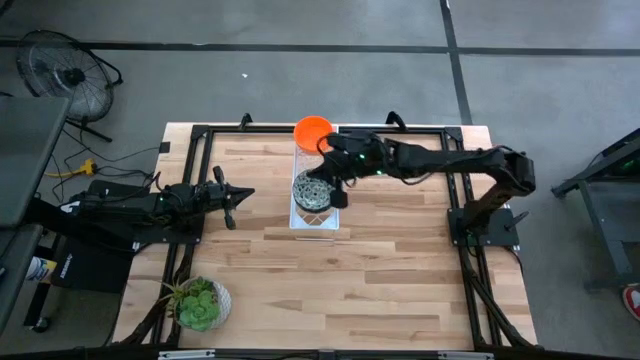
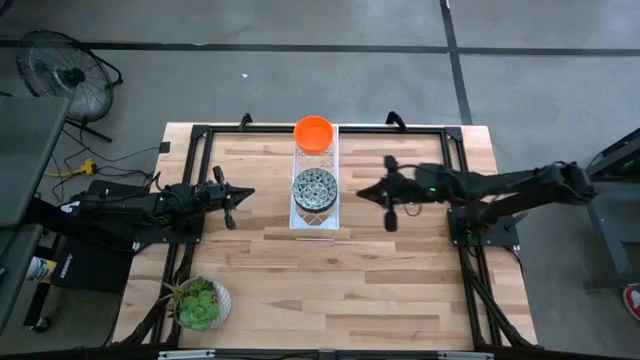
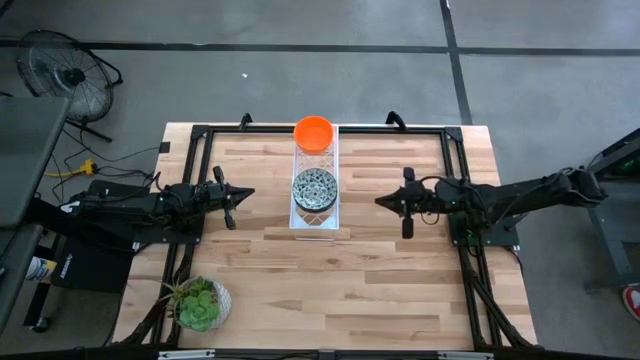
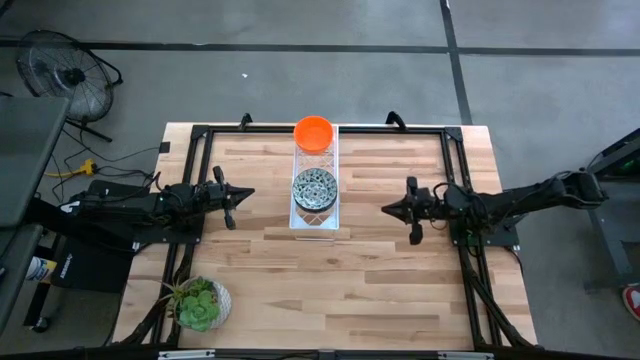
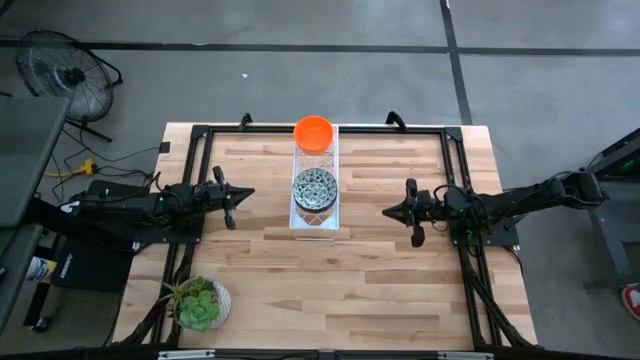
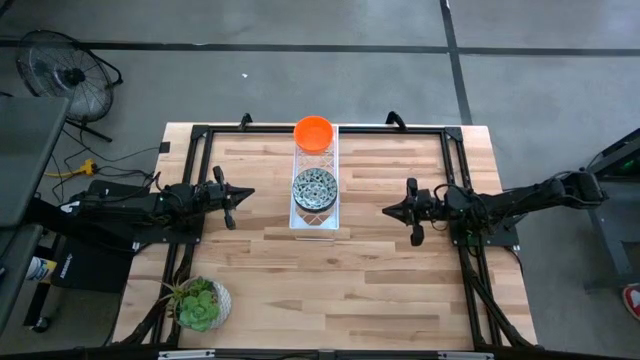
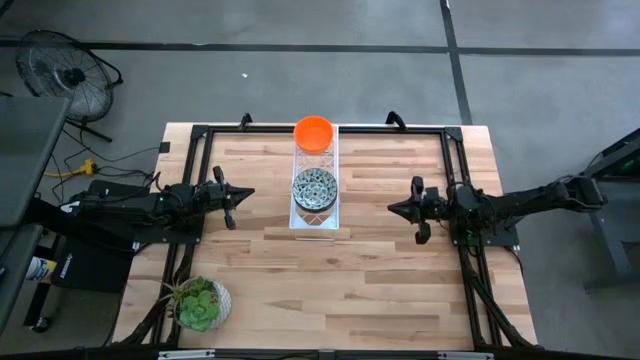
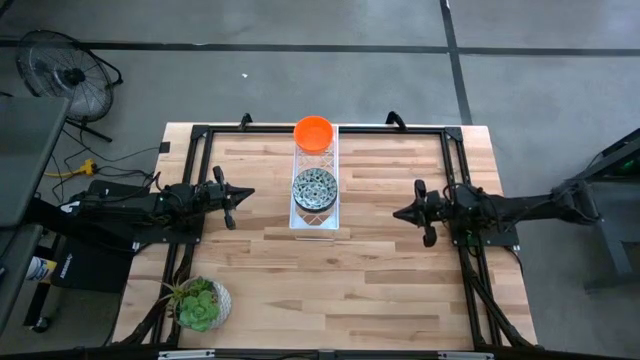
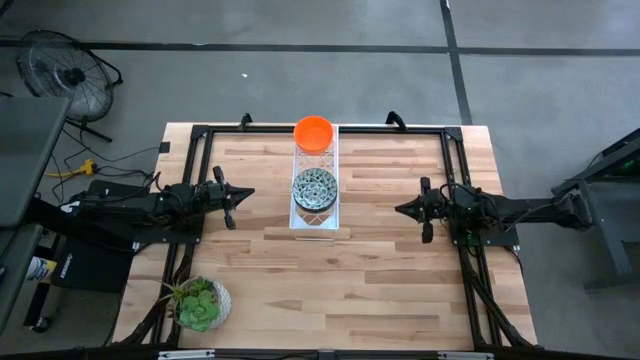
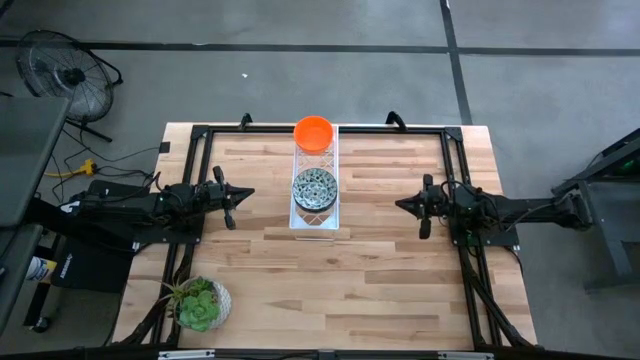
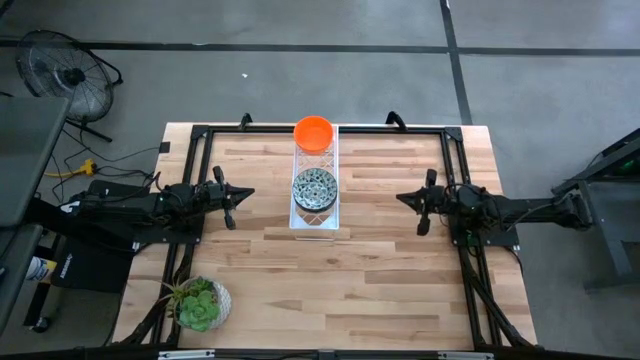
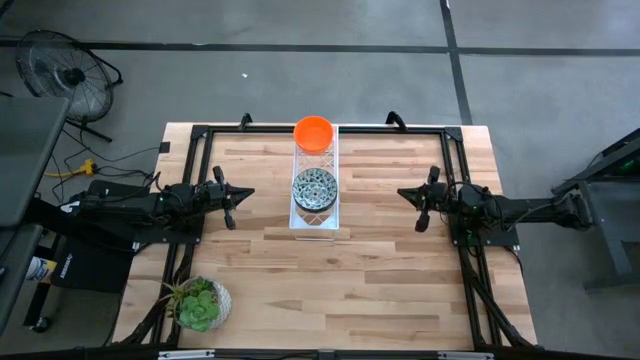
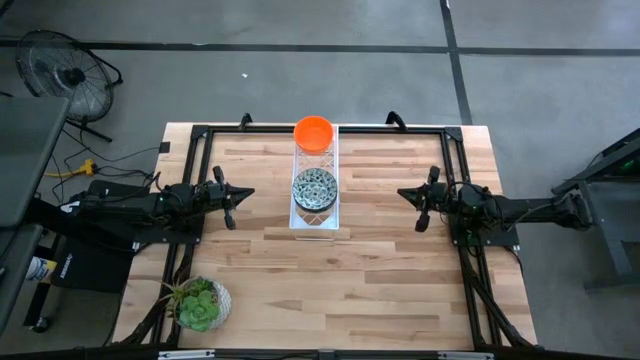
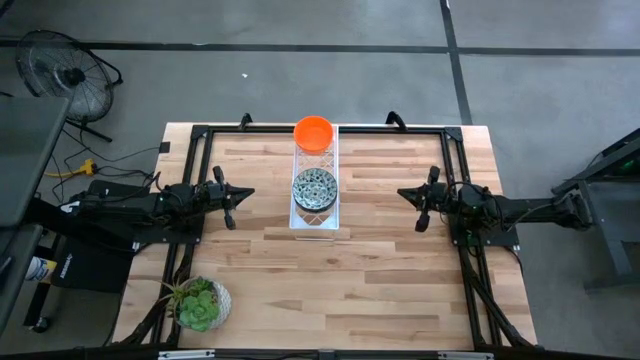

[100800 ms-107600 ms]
Task: Pick & Place Mini bowls
Return to Home Position

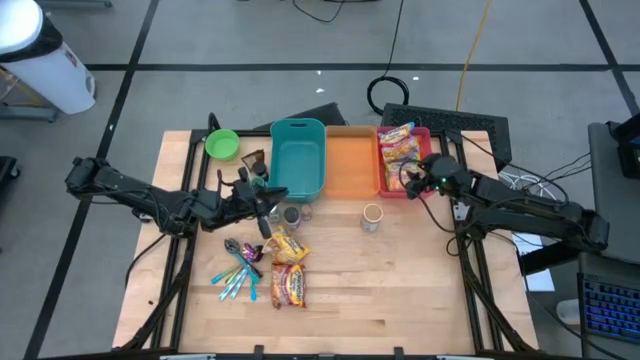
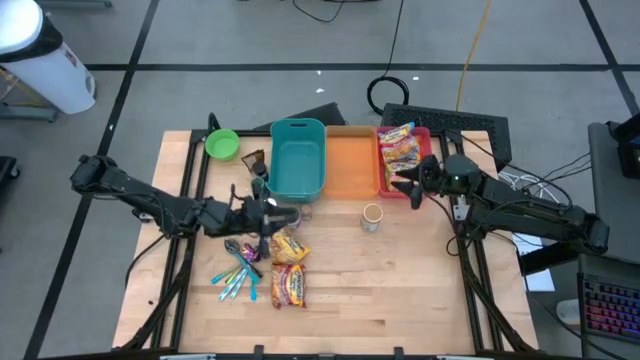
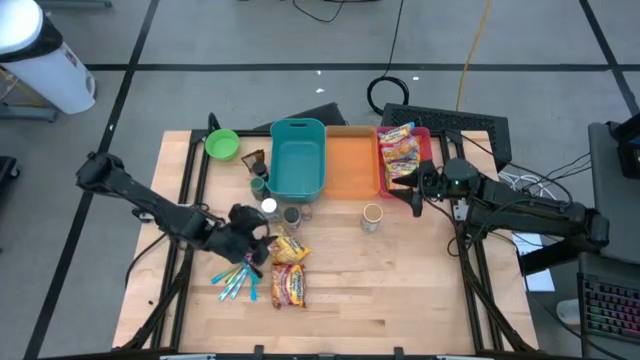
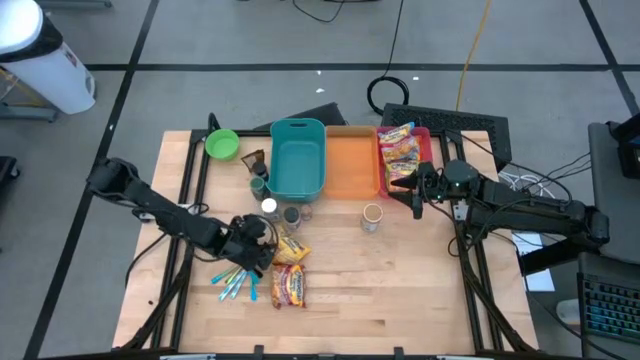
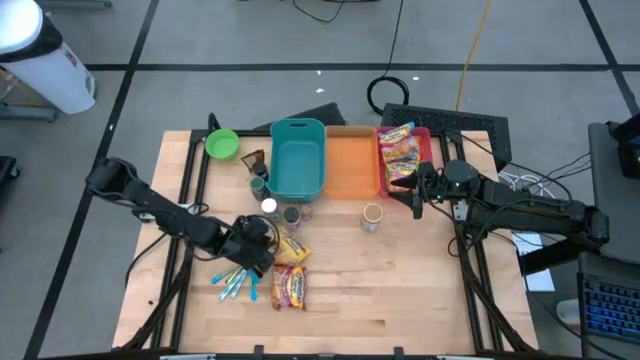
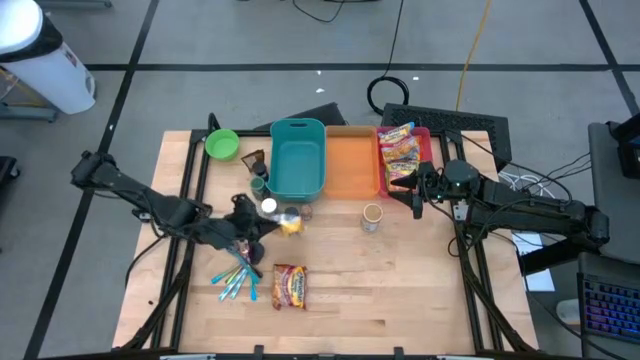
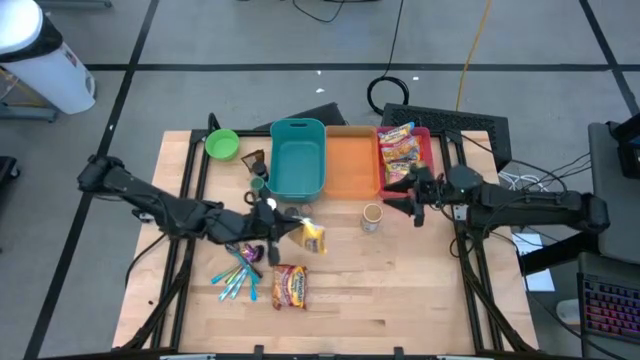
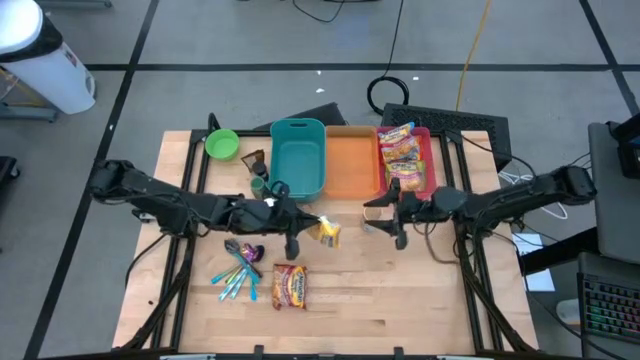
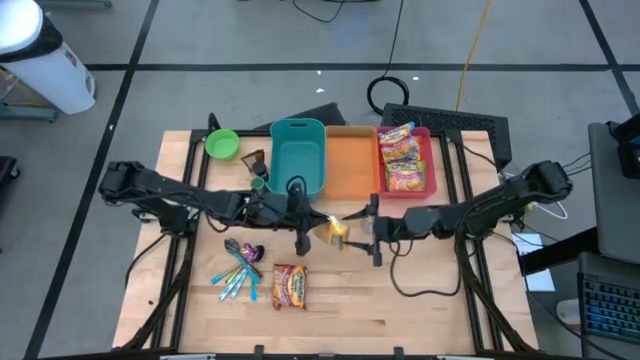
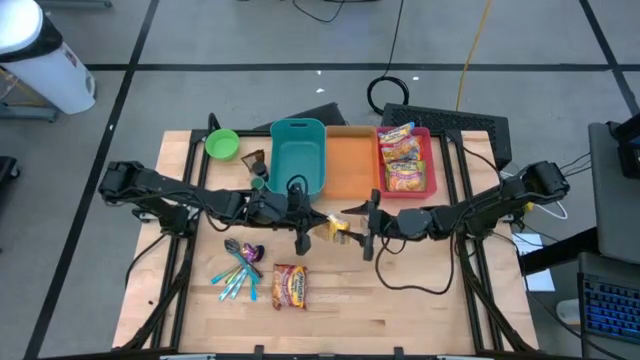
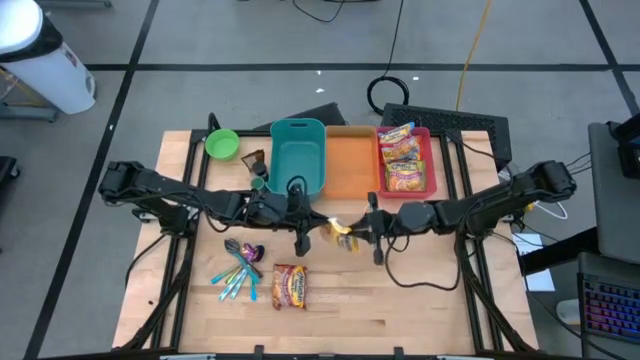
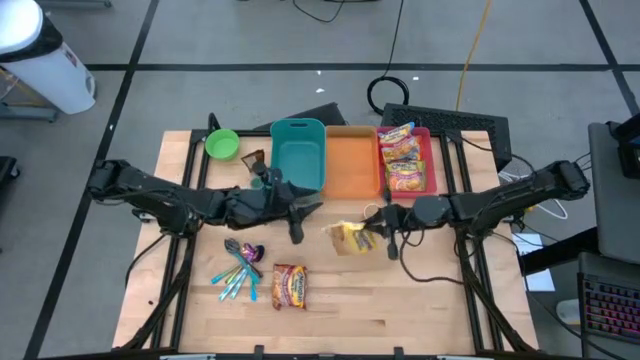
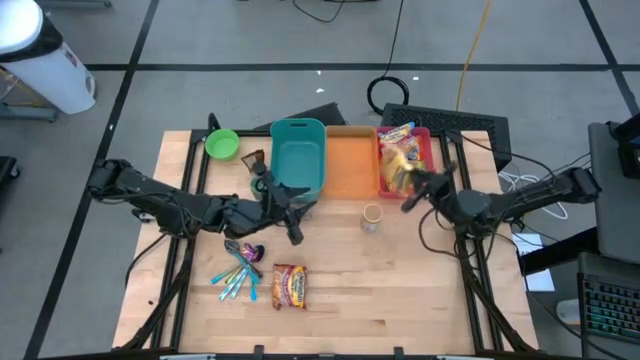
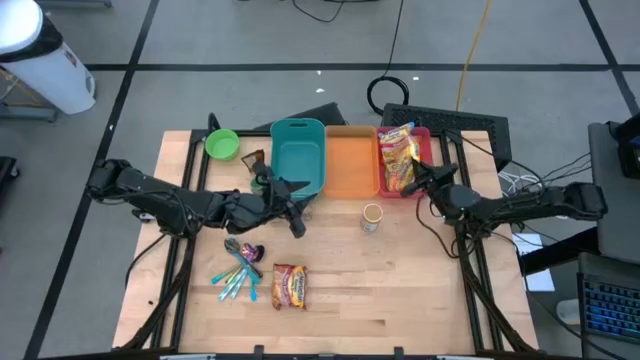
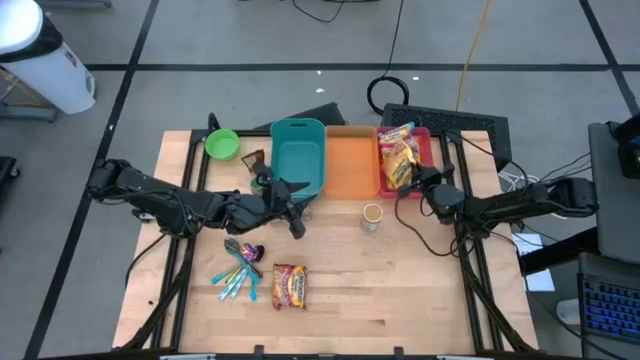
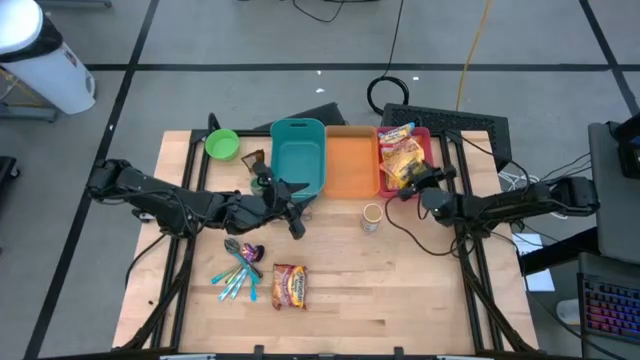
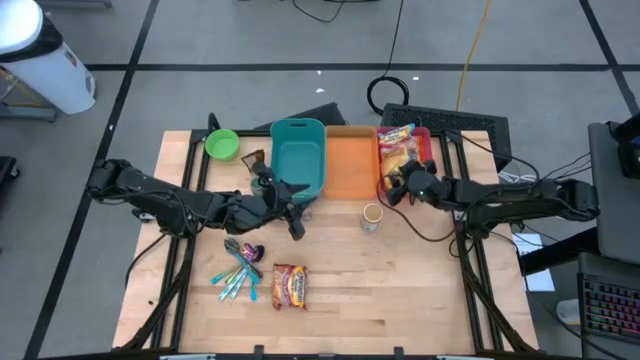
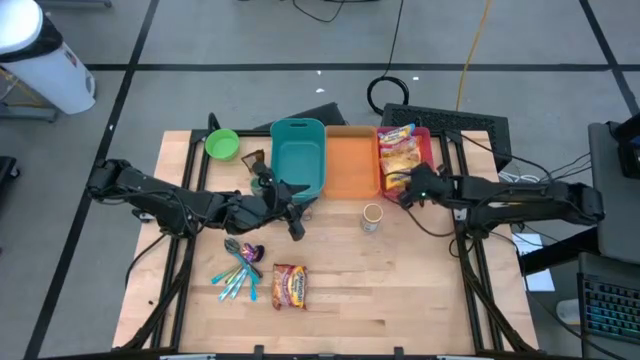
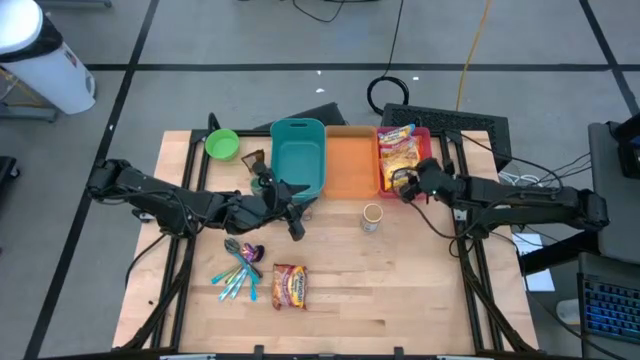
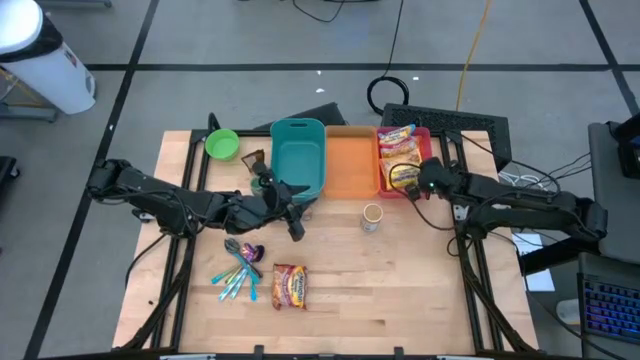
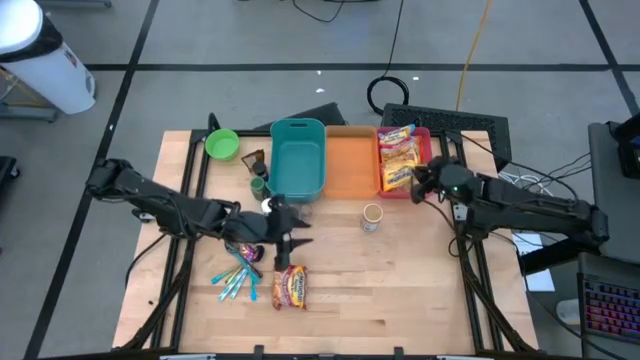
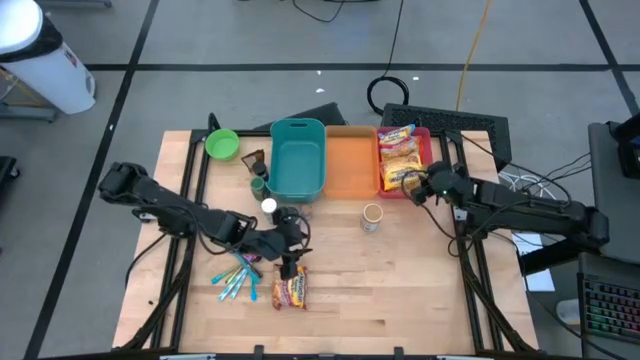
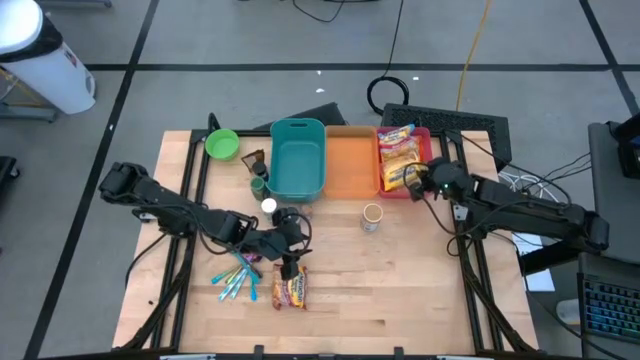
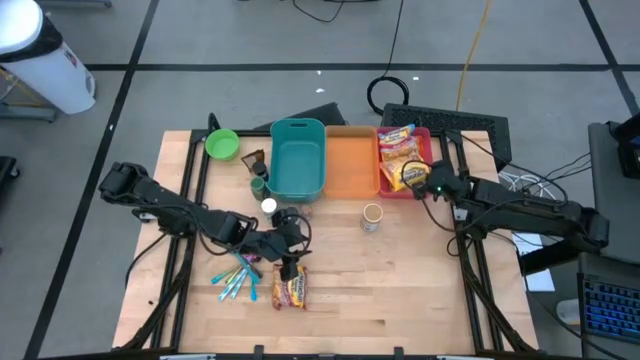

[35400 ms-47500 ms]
Task: Pick & Place Food Item
Put the yellow noodle pack into the red bin

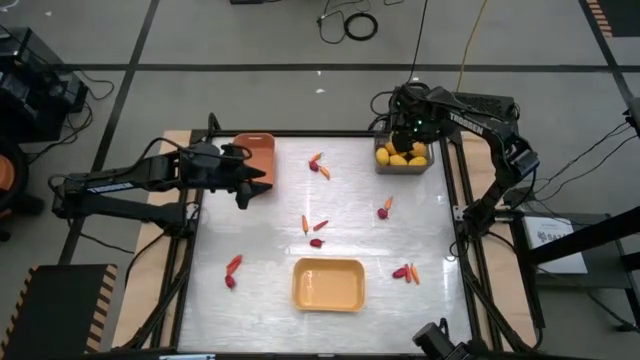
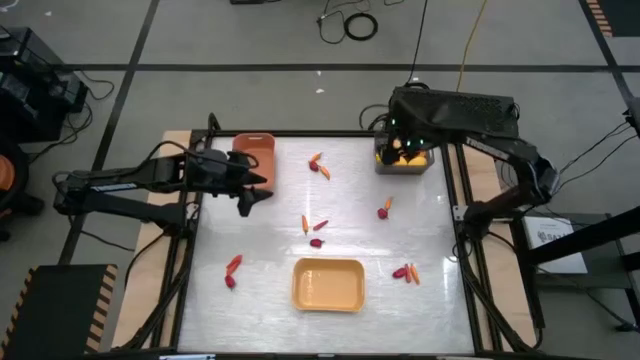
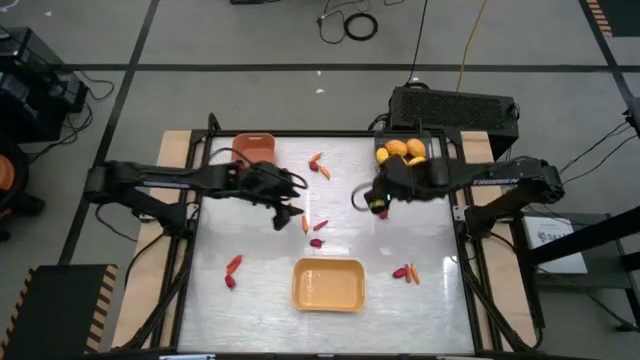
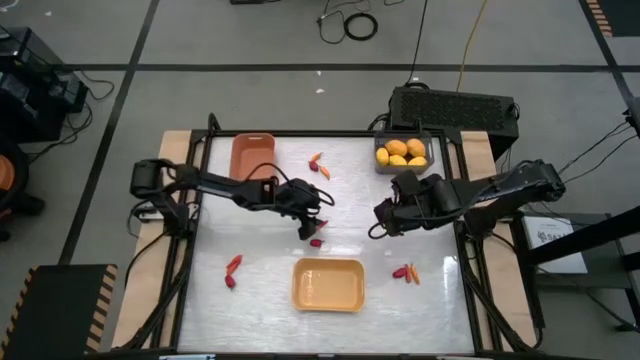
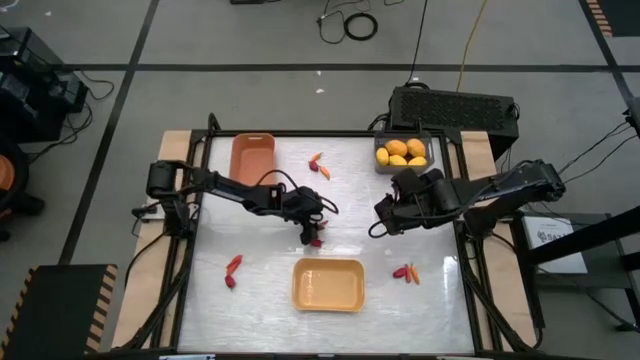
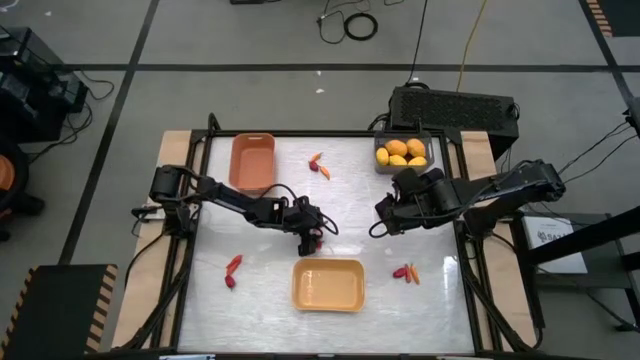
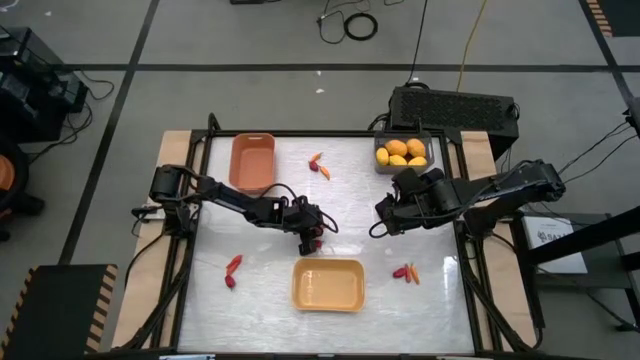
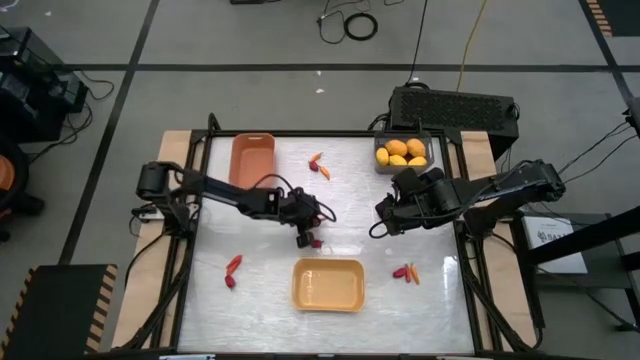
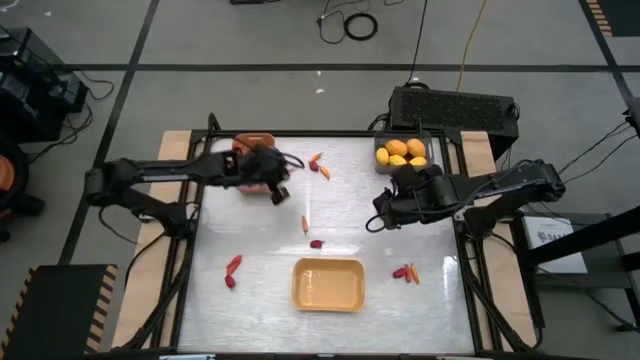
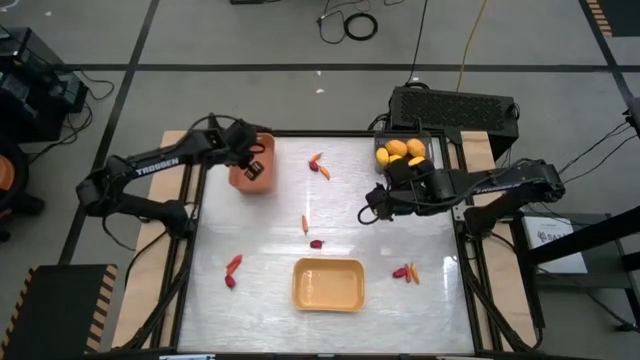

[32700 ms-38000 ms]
Task: Sort produce into baskets
Put the red chili into the orange bin
